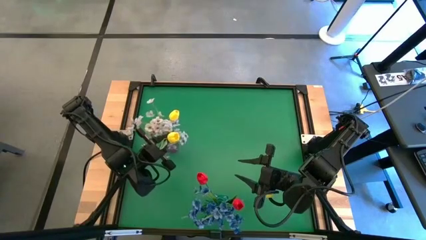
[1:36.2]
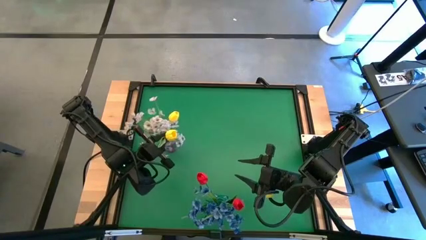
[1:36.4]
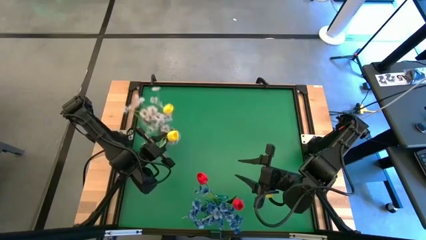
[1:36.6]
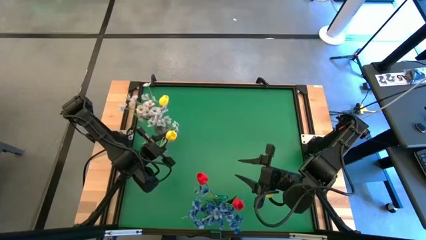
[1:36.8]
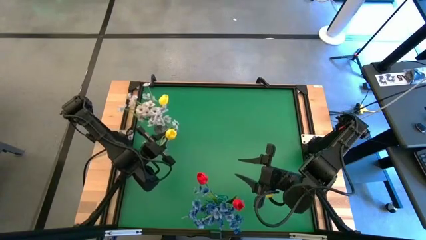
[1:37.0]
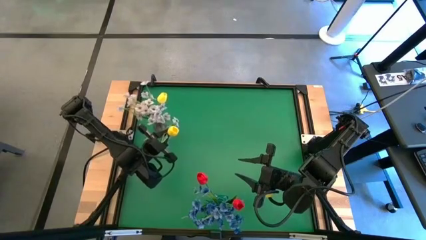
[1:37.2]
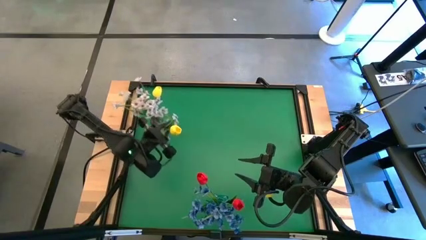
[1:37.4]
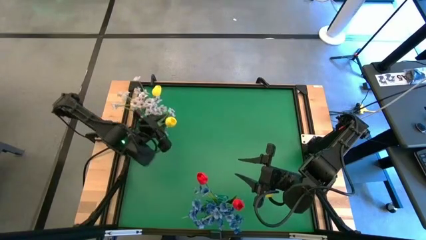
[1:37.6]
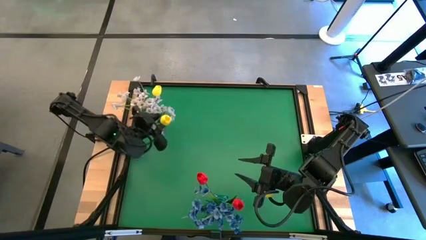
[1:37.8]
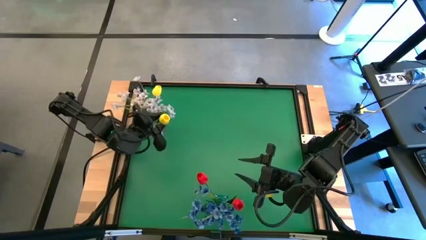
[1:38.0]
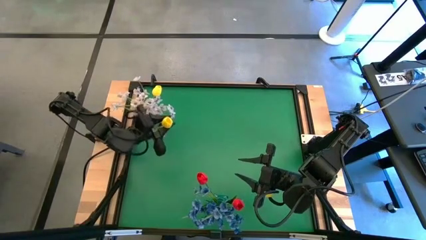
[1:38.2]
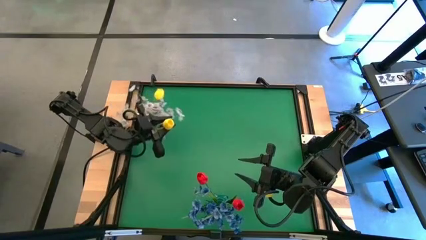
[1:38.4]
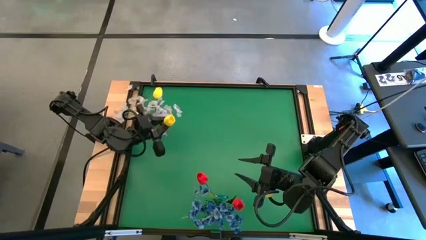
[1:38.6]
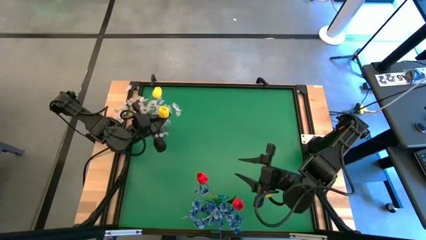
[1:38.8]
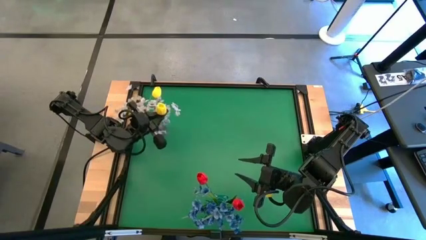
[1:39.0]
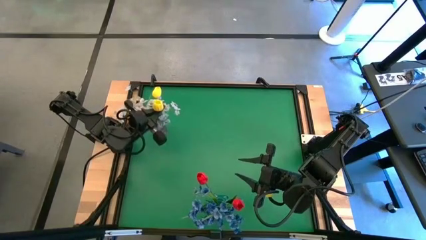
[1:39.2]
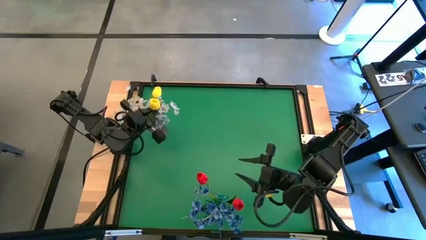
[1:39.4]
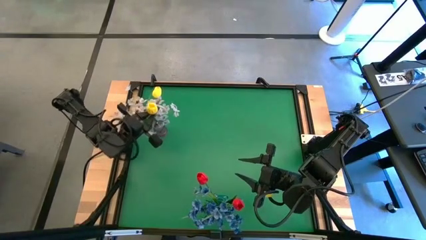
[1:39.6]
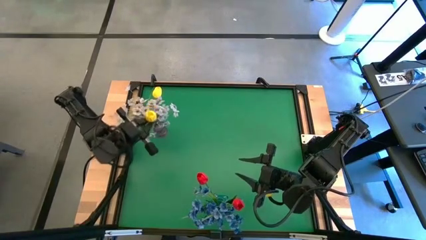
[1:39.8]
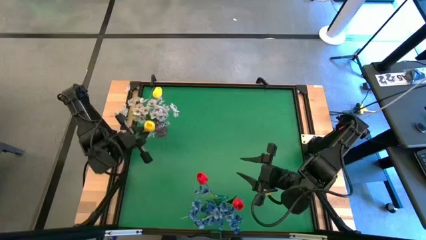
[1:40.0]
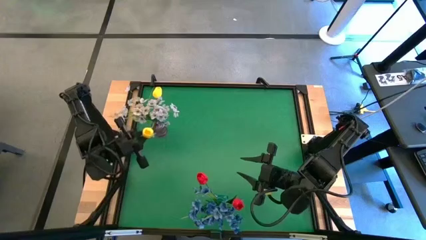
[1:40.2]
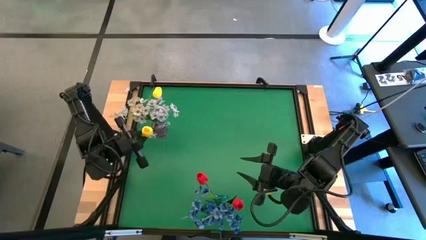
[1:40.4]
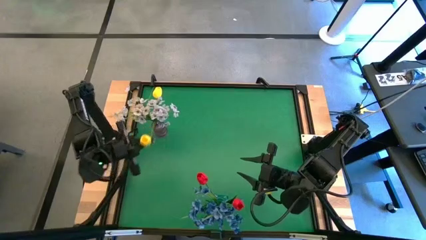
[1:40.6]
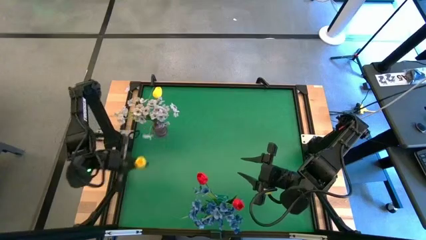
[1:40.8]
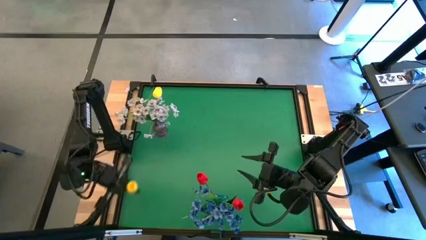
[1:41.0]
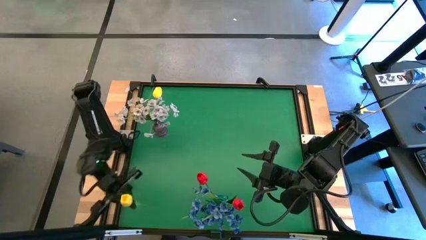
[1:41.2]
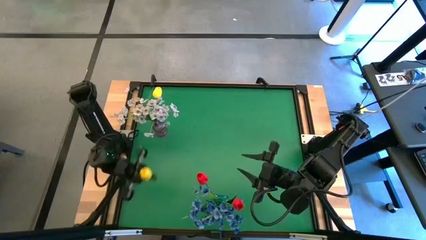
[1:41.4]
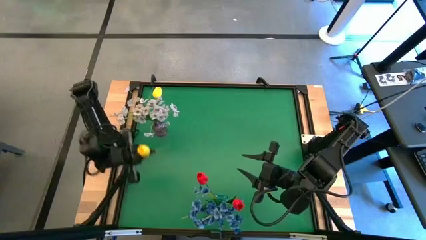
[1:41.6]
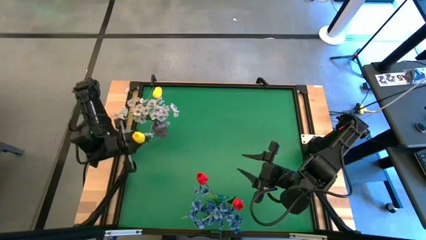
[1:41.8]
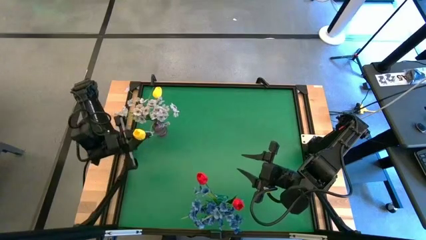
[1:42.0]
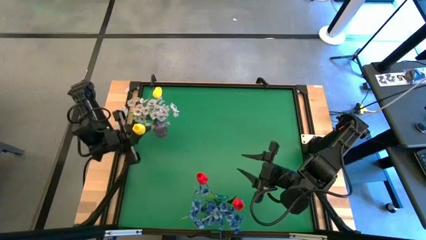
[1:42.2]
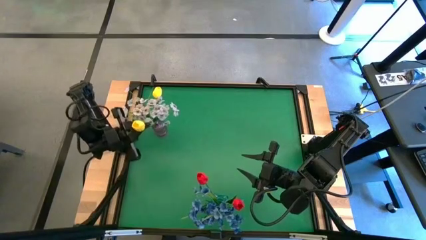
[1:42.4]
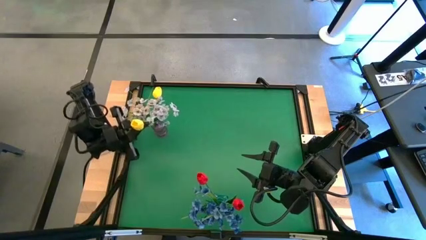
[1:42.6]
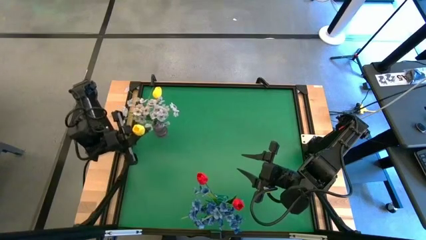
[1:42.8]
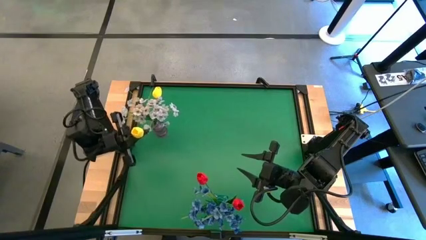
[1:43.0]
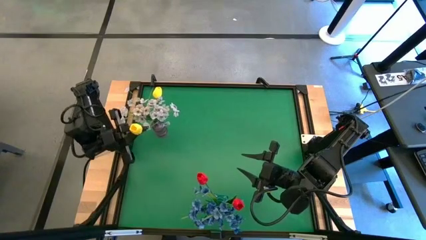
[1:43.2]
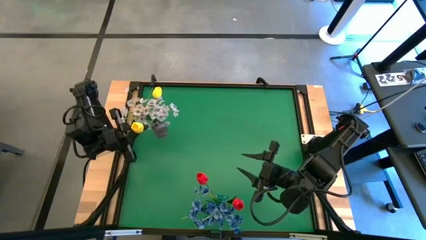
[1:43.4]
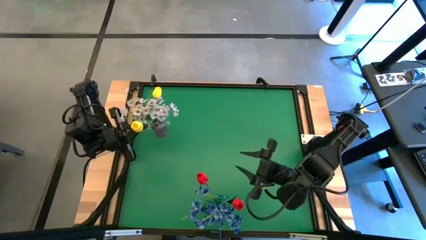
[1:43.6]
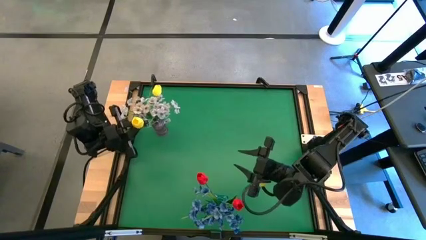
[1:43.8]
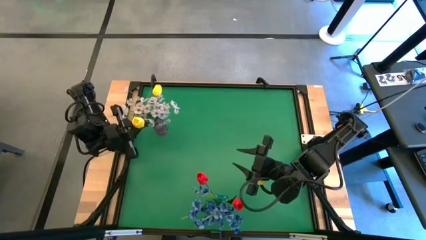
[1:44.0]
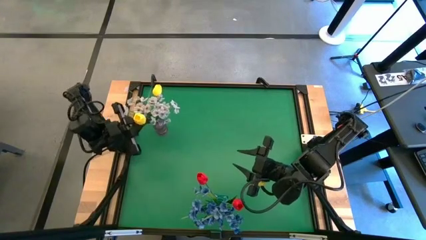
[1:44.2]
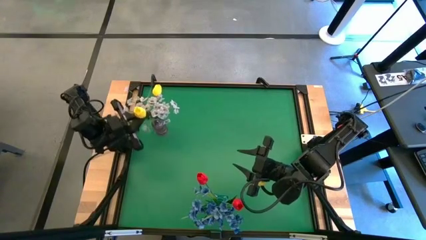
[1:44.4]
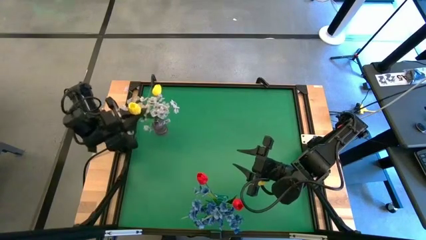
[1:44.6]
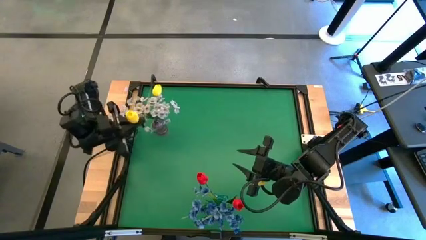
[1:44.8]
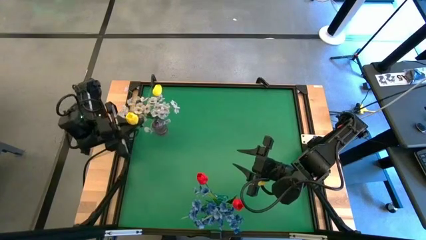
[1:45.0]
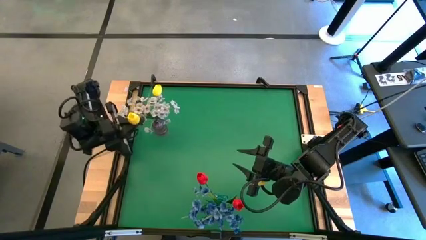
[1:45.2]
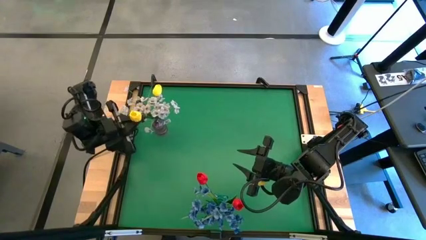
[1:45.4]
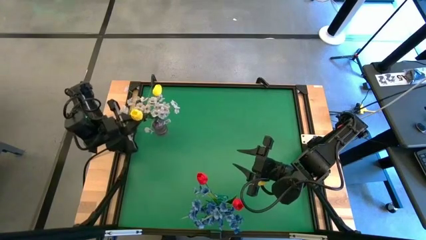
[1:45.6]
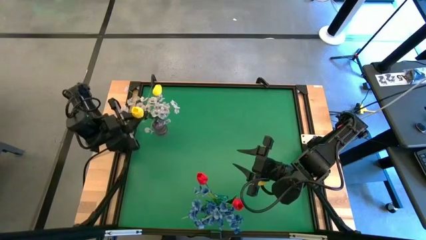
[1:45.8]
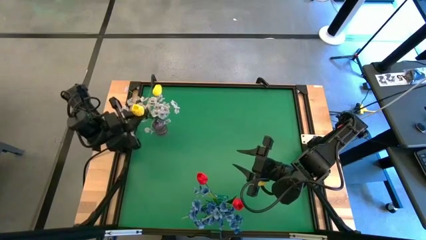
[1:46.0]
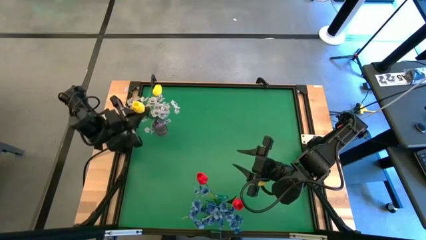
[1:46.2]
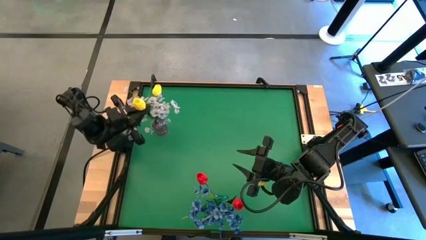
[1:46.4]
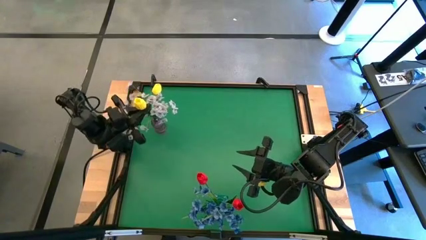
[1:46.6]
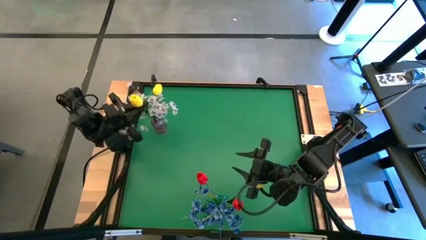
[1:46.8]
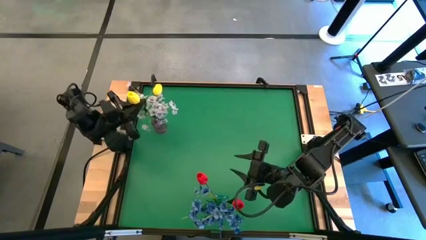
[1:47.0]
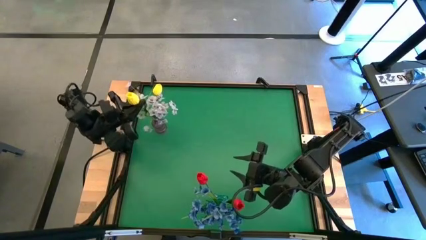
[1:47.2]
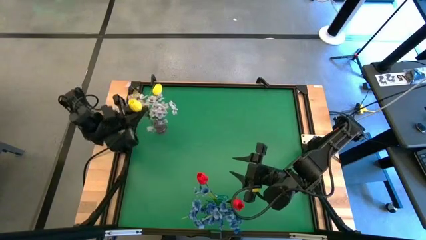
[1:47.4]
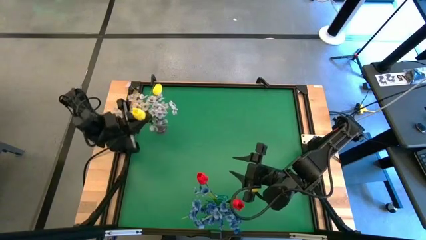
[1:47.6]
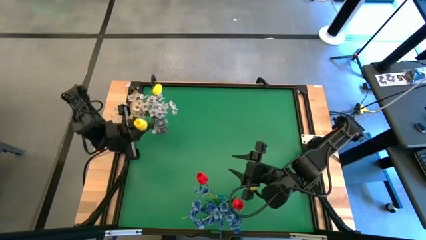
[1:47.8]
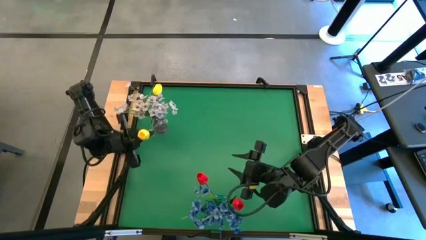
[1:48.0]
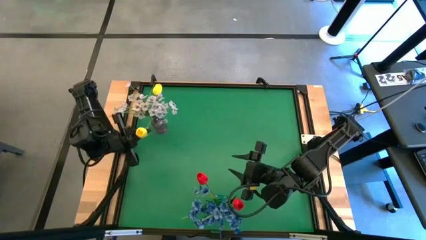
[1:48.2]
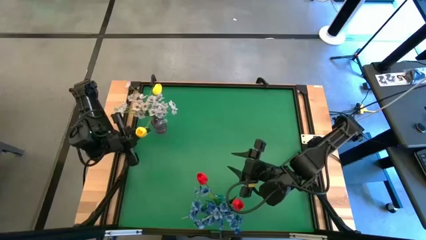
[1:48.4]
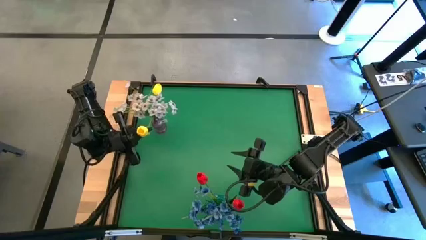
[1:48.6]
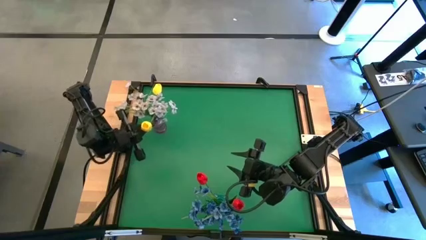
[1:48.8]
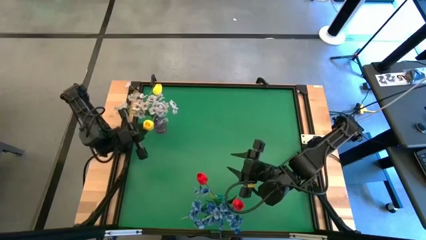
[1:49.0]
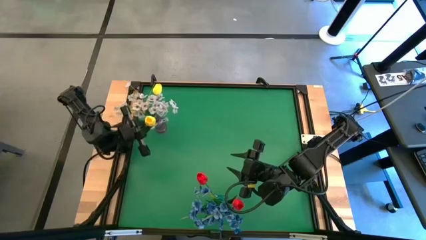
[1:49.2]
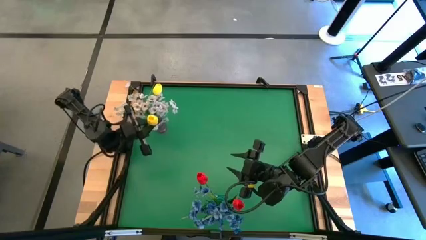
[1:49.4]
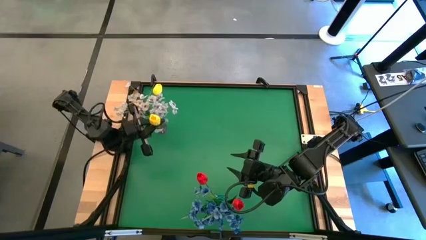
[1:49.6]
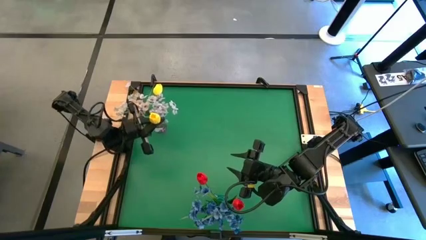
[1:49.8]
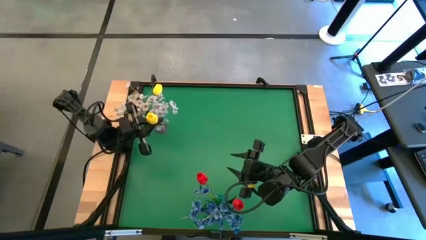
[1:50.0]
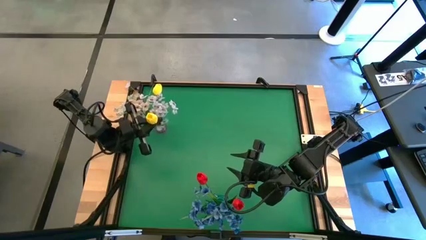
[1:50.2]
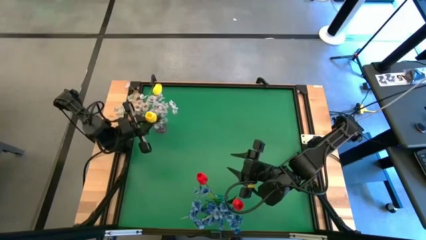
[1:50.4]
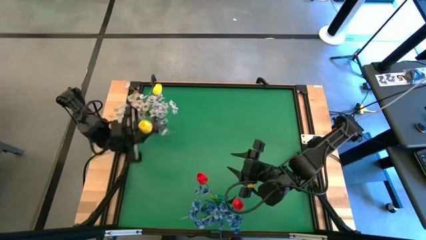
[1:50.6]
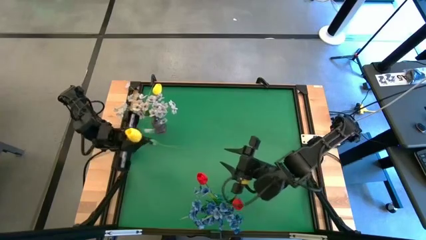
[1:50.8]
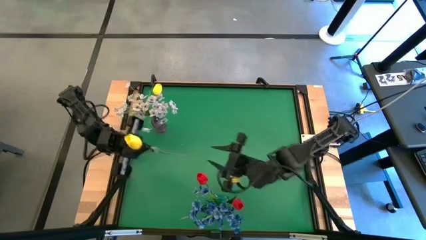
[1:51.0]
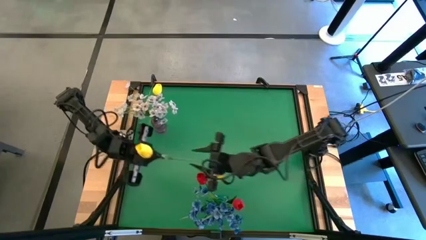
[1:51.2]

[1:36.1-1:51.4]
Task: Sort flowers into vase by color
Put the yellow flower into the purple vase

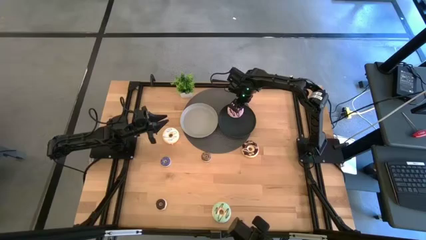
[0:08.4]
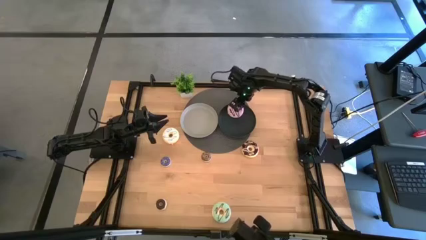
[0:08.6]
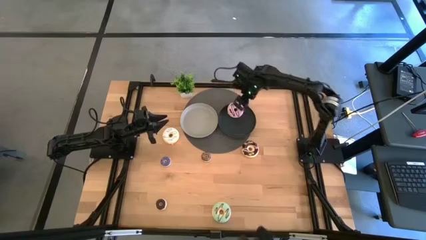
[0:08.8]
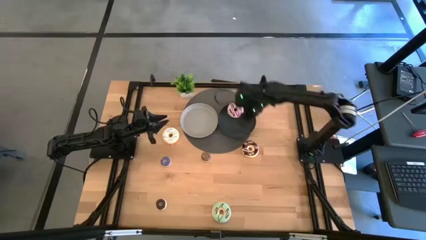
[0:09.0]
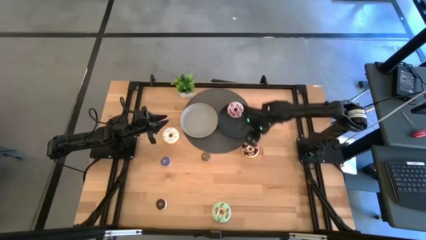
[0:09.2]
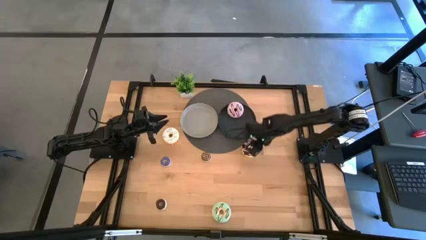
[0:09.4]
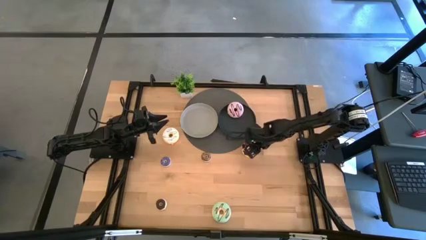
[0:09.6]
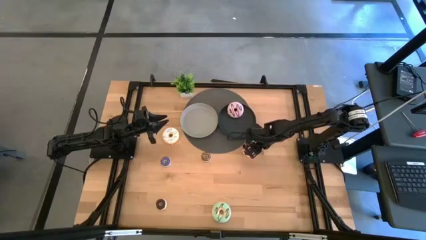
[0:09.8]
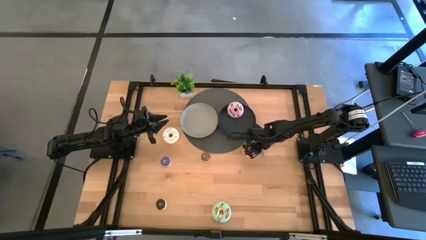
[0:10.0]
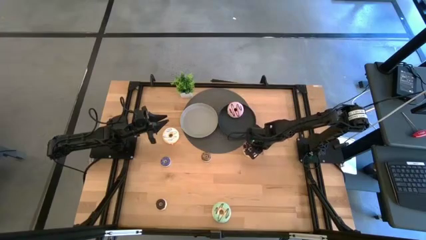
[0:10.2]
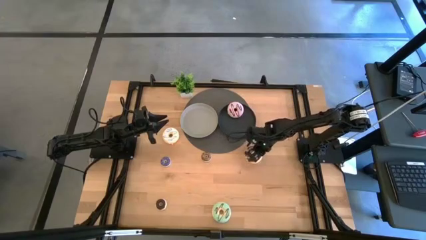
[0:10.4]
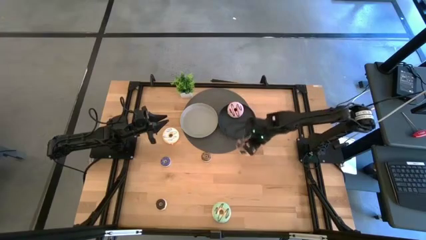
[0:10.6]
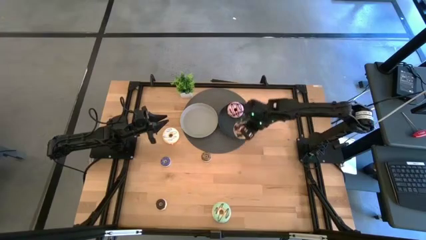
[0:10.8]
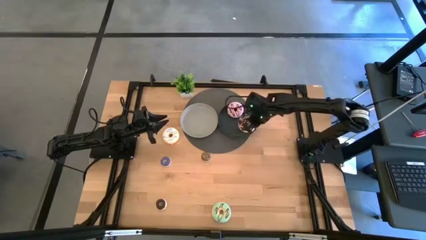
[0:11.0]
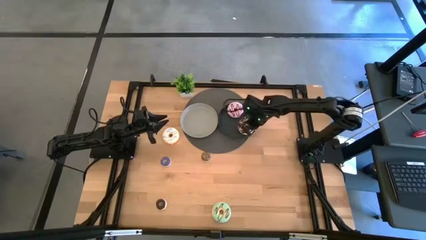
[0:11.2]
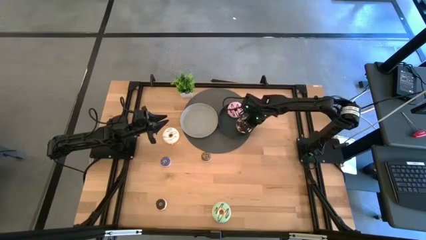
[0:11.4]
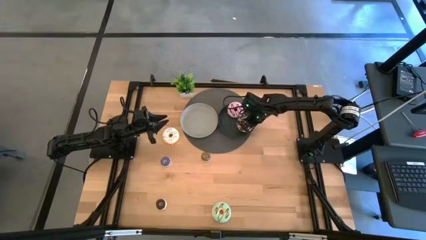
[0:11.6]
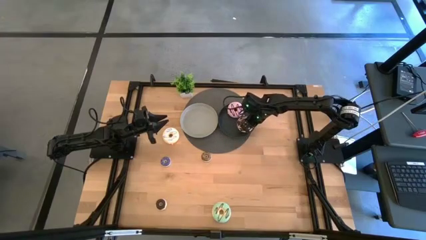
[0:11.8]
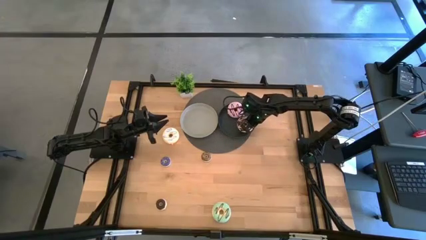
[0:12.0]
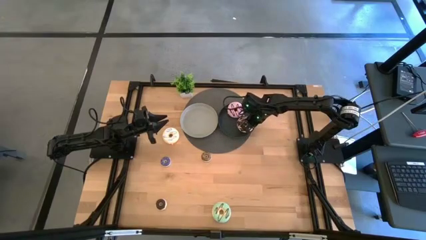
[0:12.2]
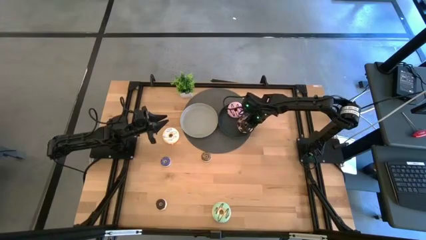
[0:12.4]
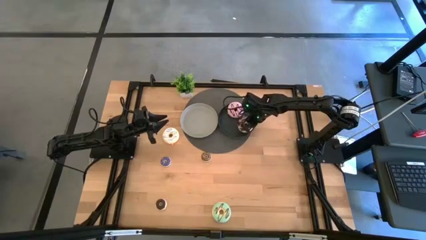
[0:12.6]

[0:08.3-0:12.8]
Task: Pick & Place donuts
Put the big black donut on the black plate
